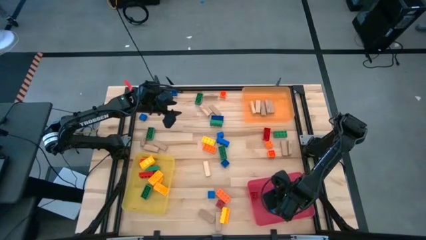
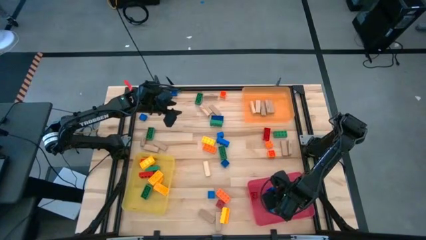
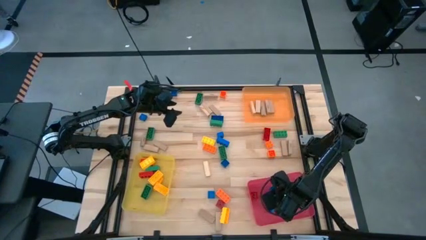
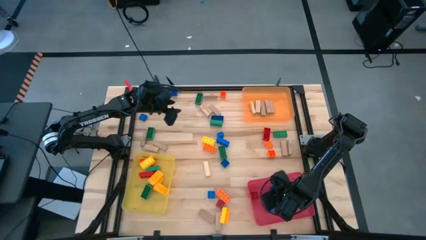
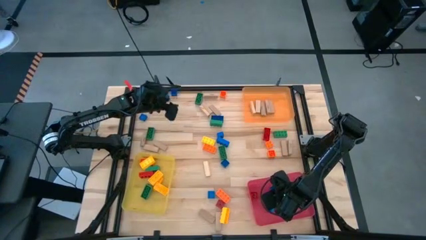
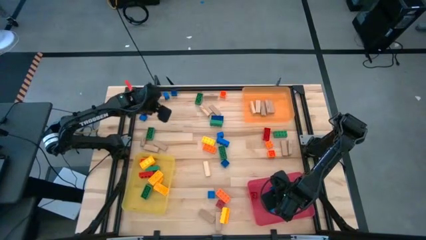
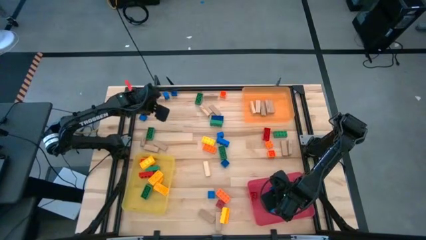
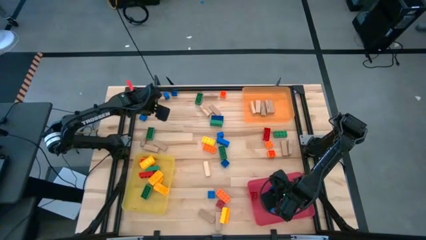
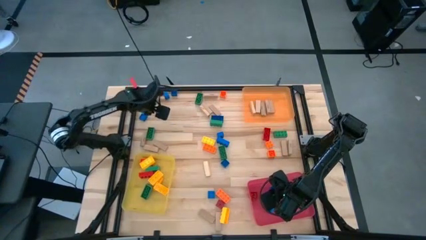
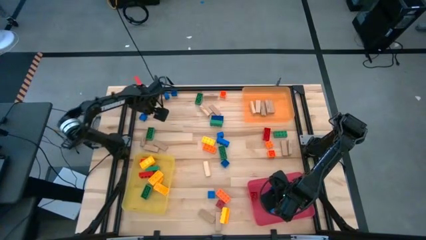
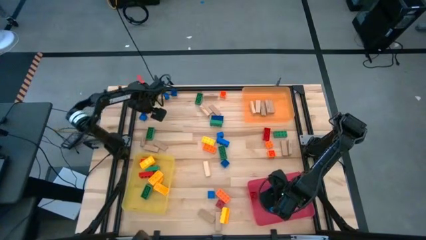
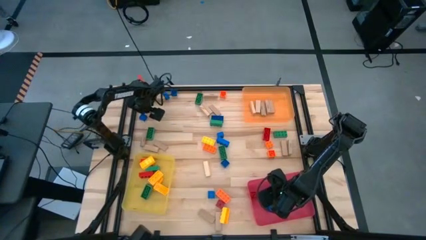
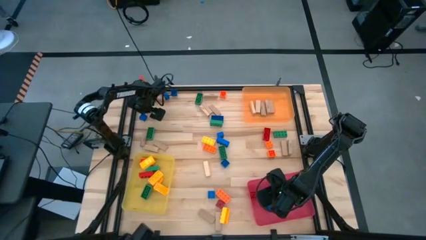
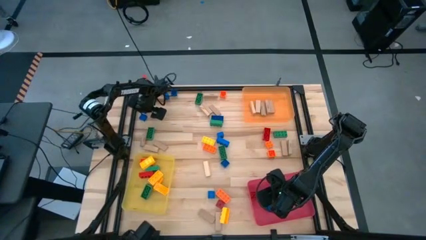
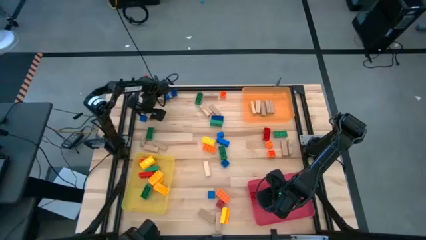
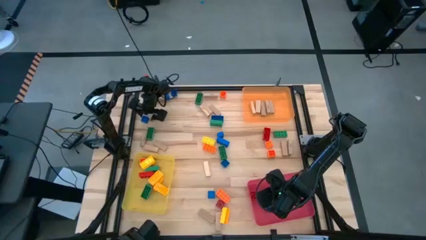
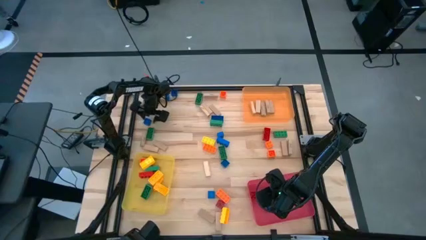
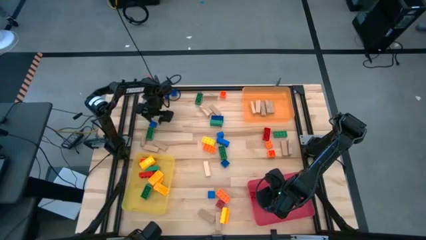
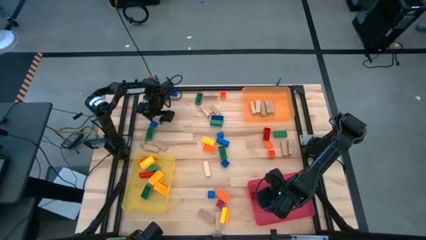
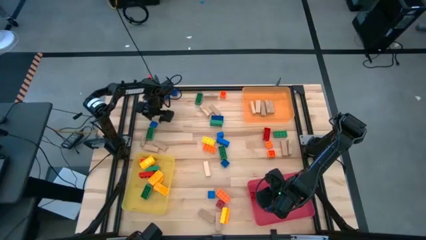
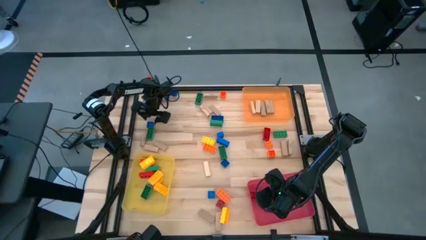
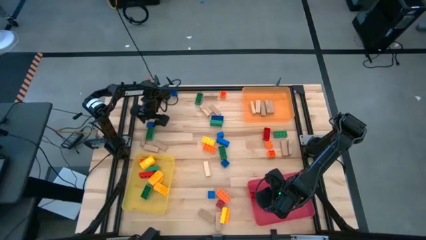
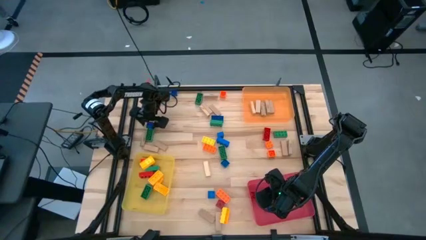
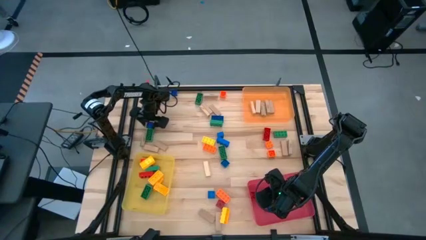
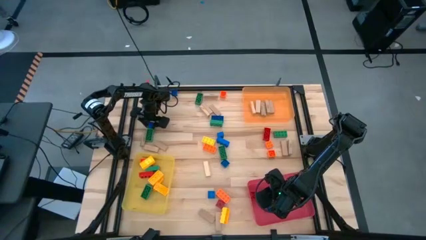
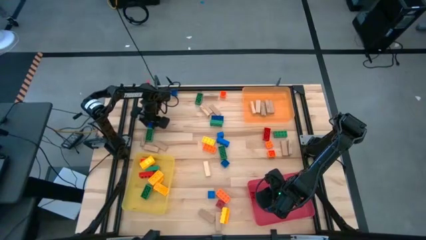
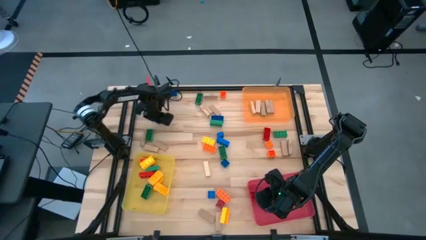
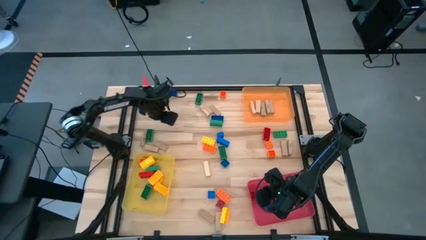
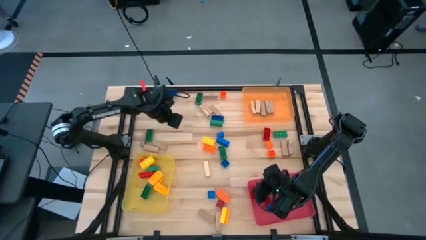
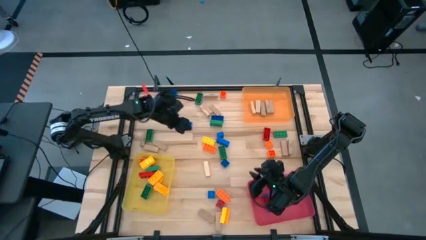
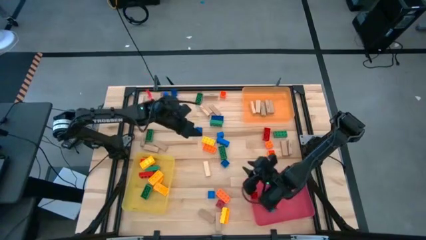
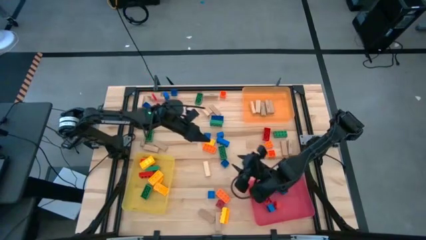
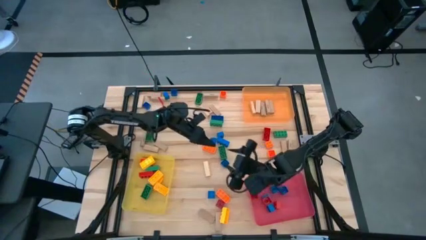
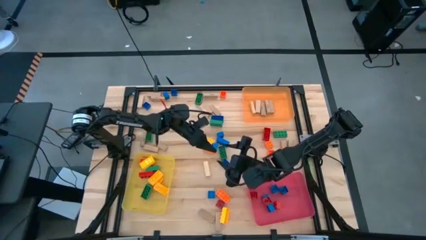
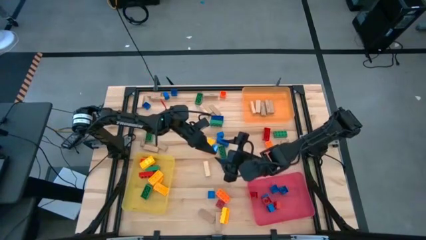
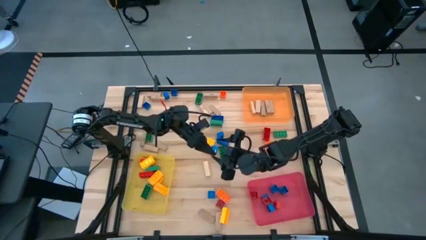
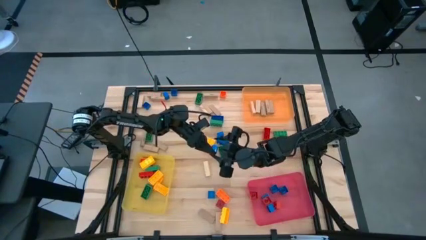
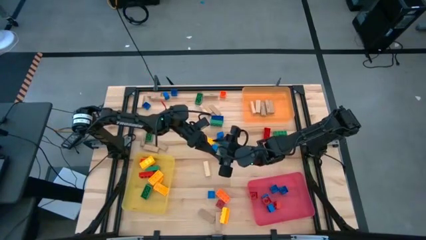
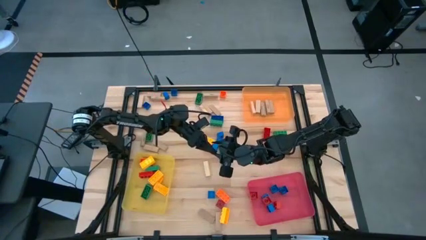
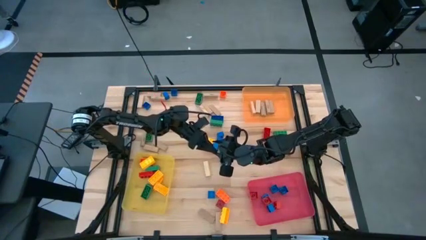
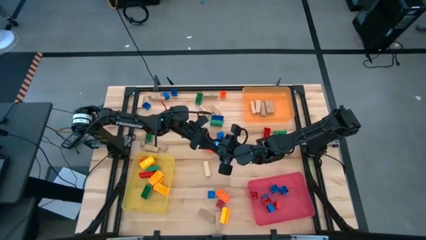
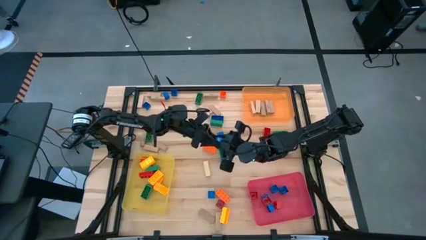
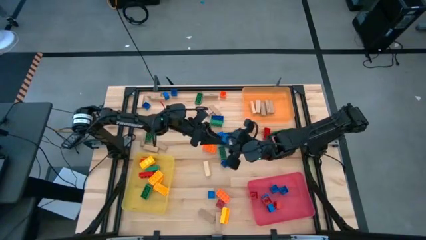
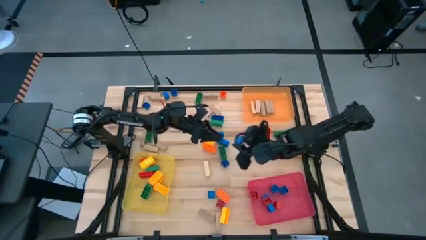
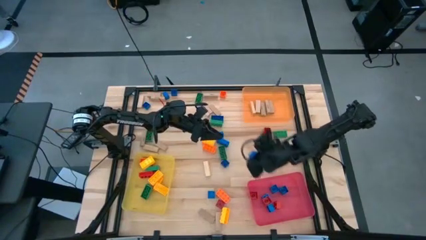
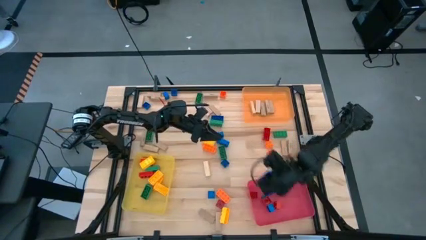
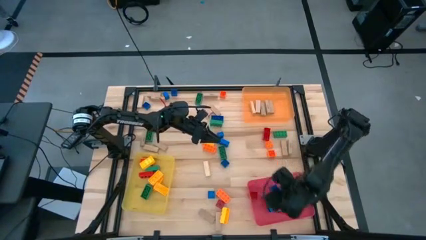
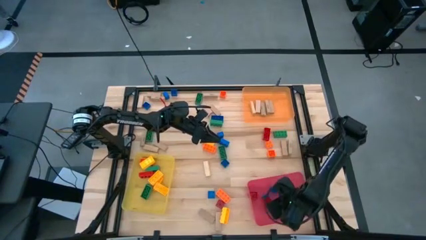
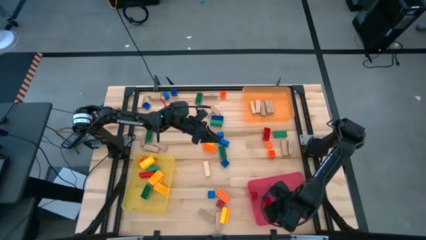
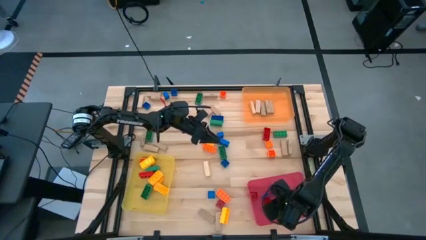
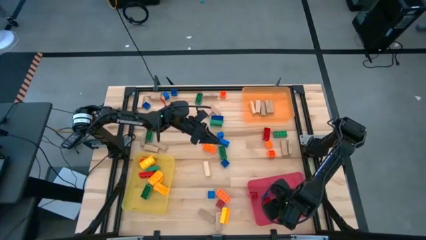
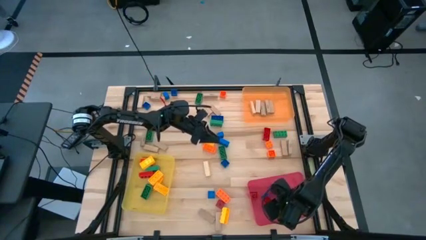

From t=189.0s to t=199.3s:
Task: Sort blocks by size
Put the small blue game piece into the red bin

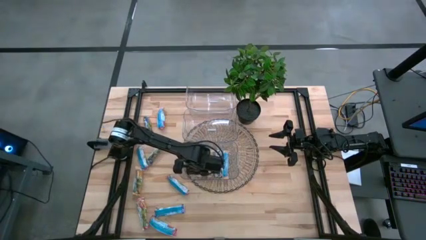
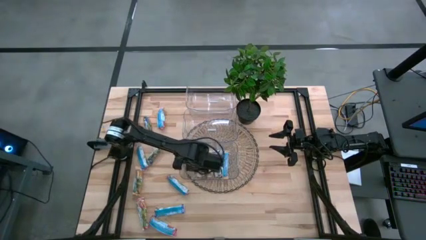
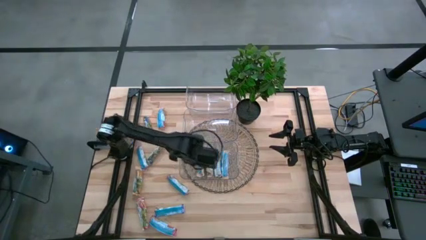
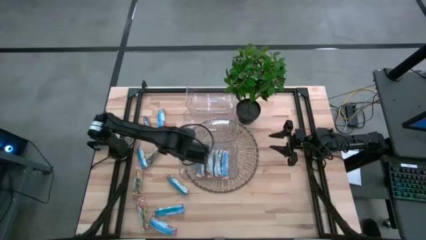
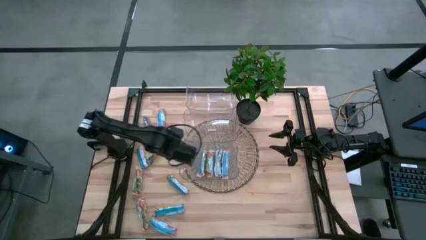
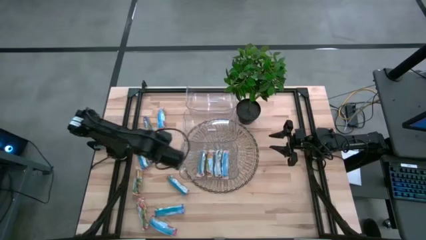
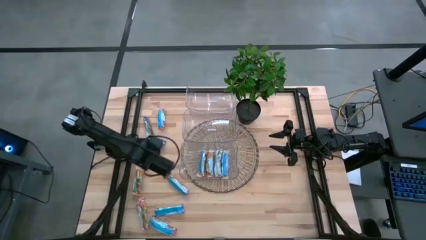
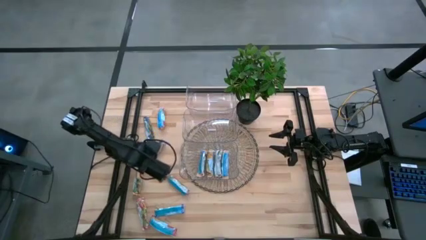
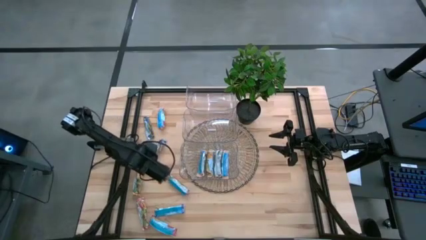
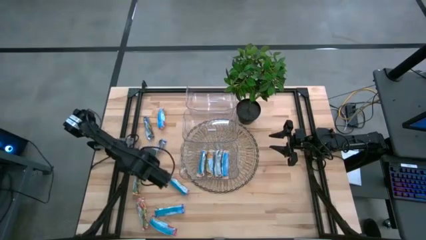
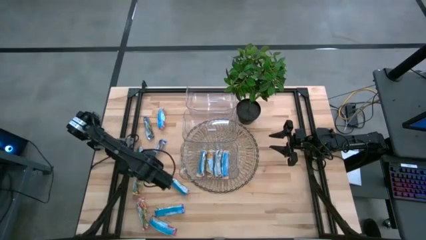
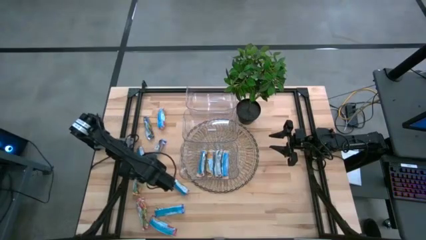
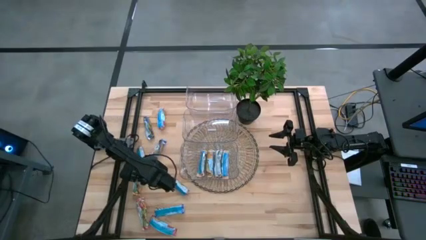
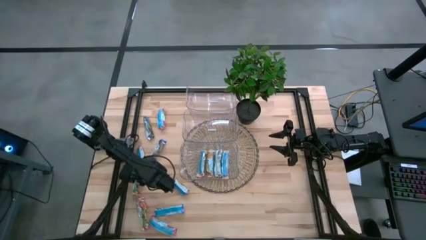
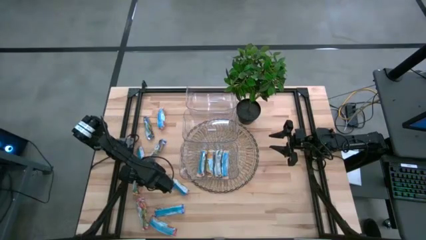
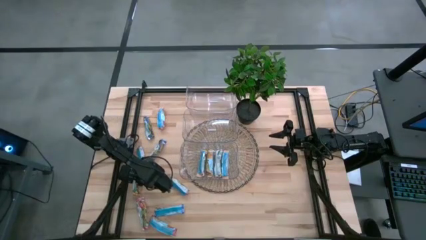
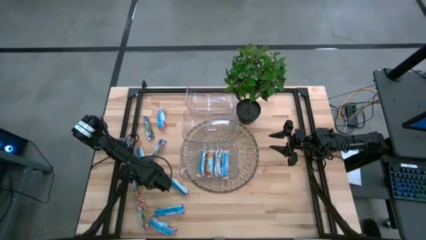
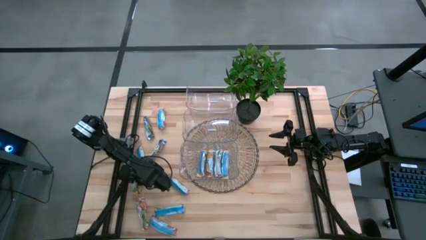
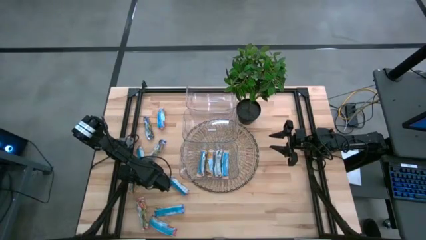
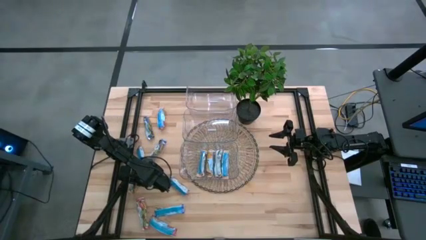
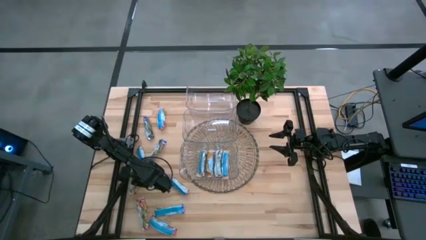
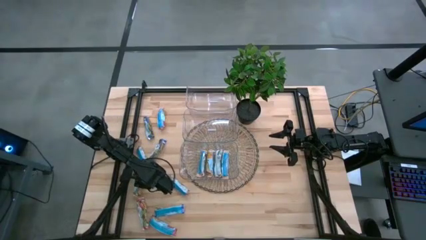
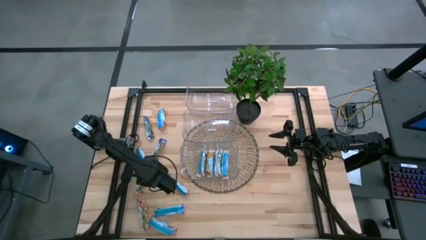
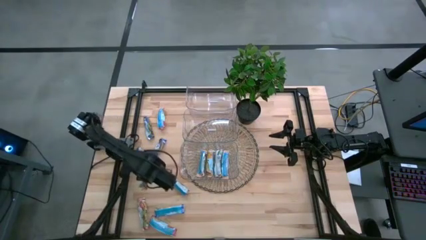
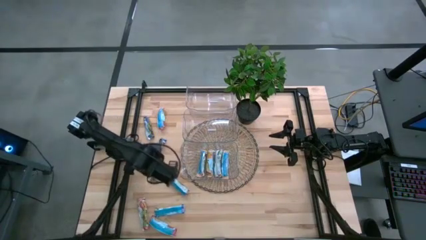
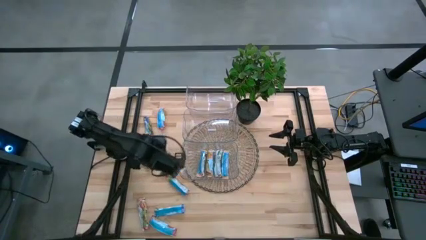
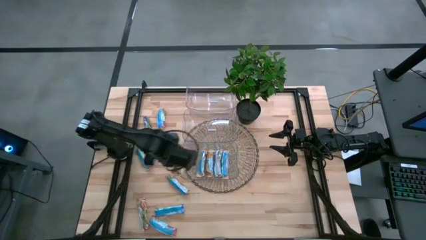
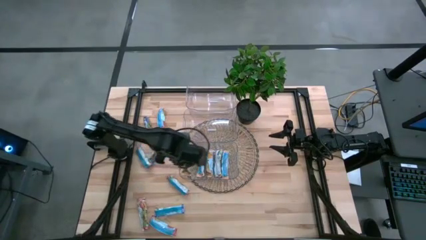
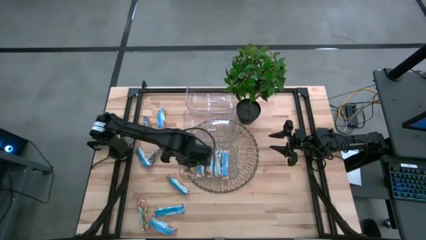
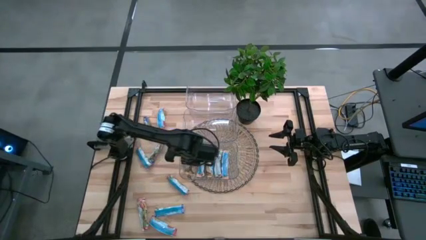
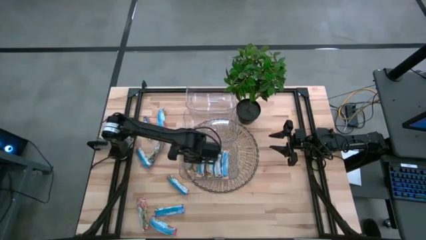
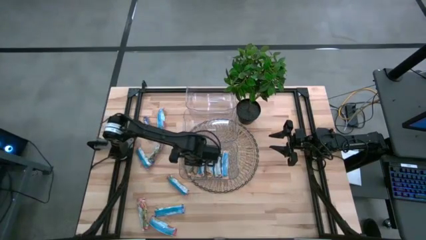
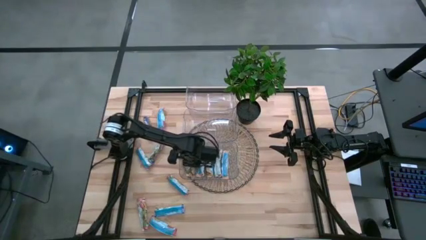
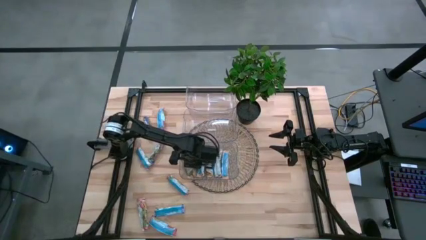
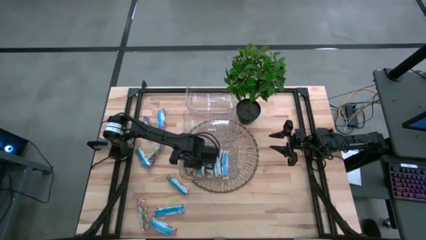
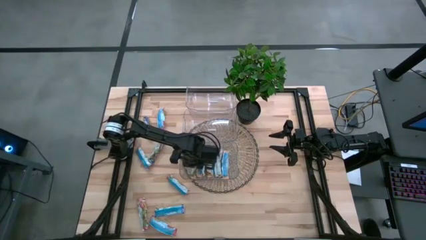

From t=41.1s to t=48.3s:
Task: Pick and place Granola Bars by type
Put the yellow granola bar into the bottom transparent bin
